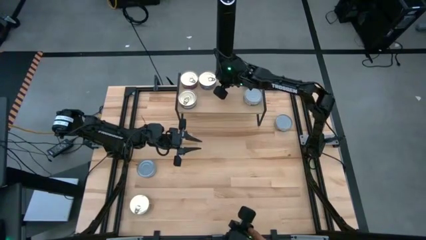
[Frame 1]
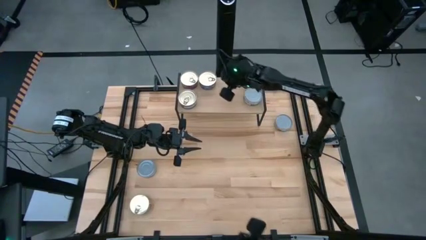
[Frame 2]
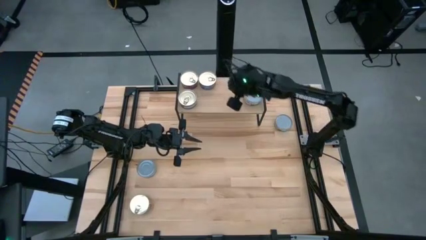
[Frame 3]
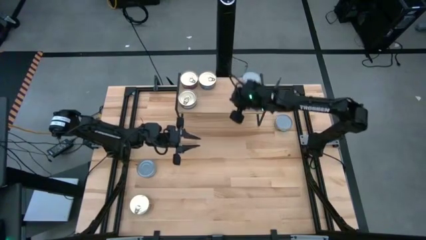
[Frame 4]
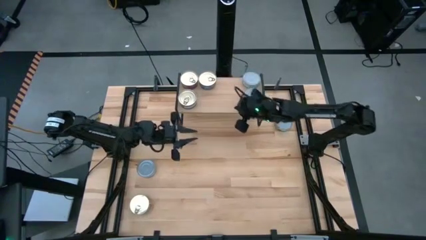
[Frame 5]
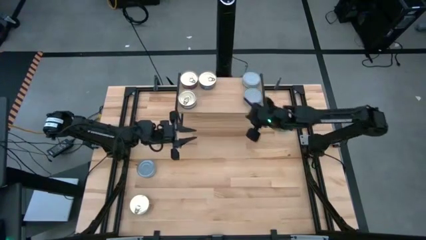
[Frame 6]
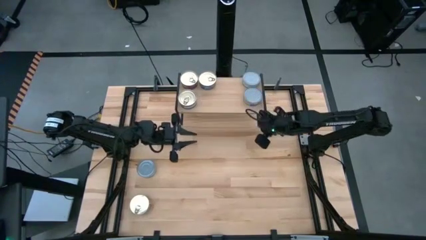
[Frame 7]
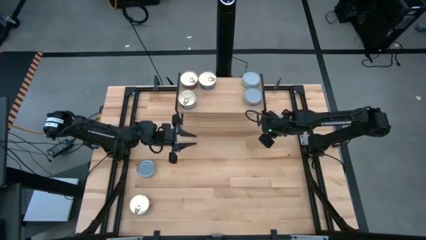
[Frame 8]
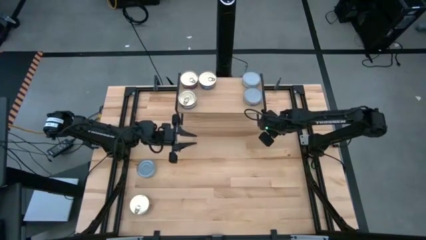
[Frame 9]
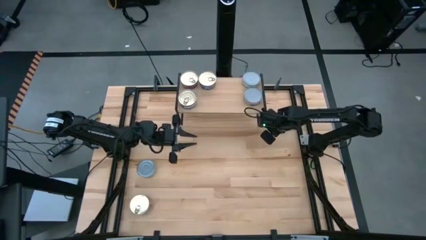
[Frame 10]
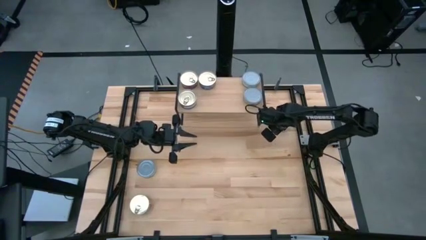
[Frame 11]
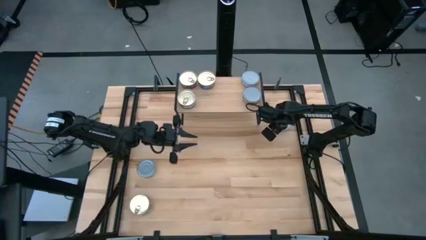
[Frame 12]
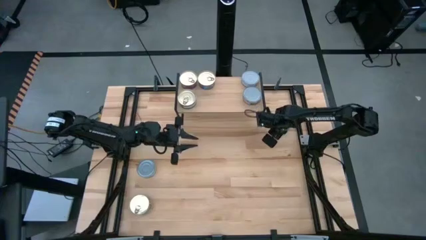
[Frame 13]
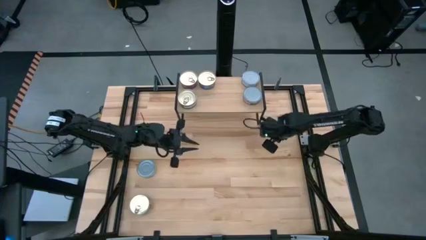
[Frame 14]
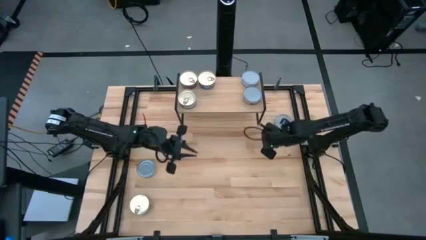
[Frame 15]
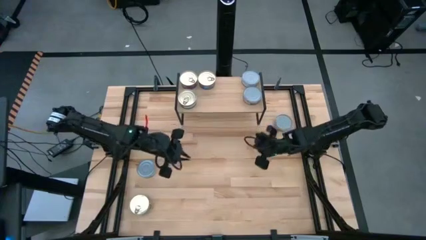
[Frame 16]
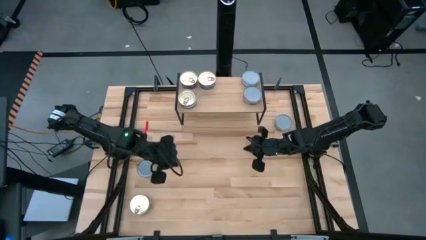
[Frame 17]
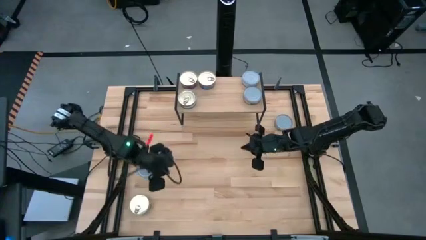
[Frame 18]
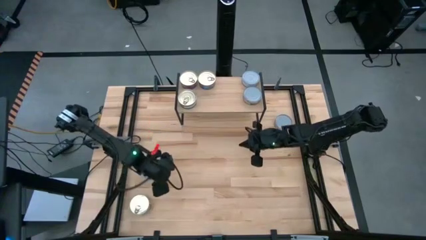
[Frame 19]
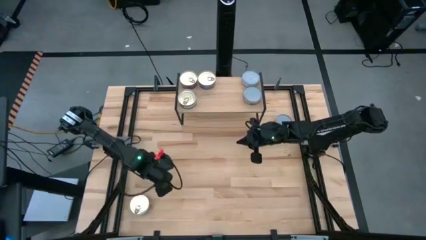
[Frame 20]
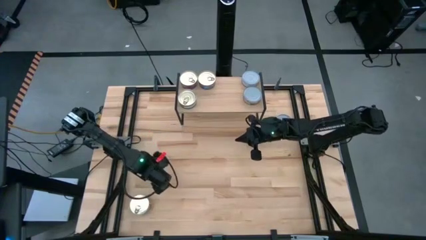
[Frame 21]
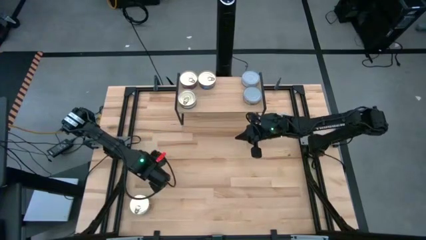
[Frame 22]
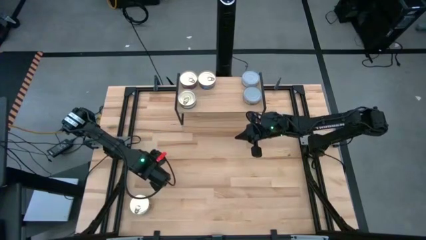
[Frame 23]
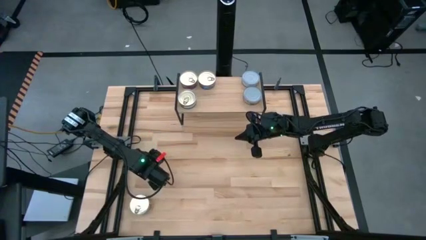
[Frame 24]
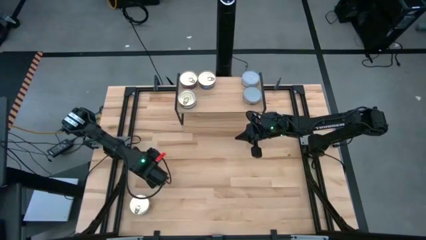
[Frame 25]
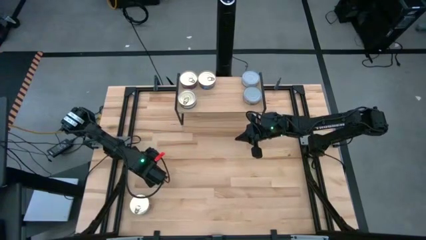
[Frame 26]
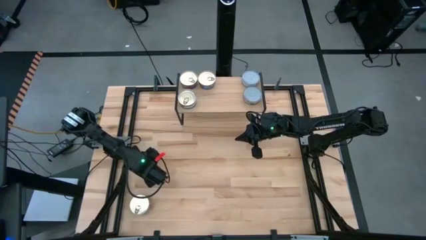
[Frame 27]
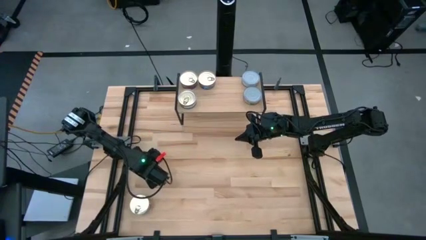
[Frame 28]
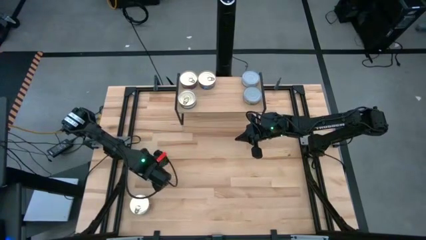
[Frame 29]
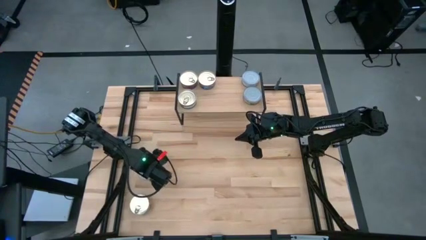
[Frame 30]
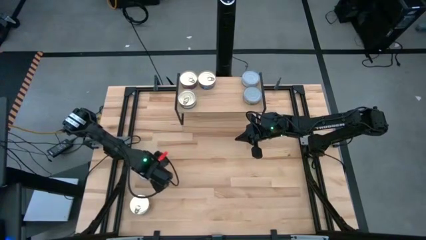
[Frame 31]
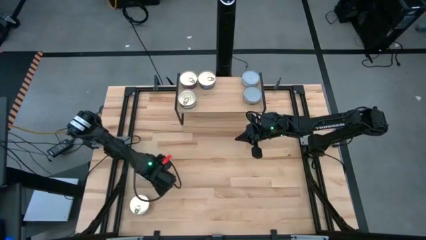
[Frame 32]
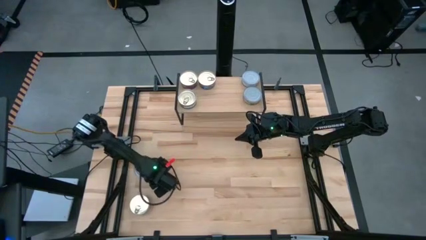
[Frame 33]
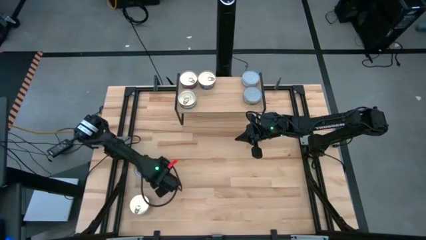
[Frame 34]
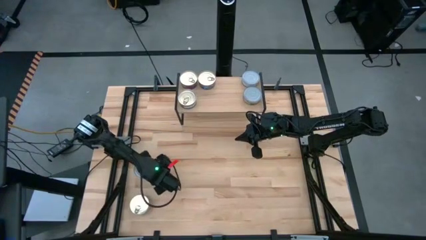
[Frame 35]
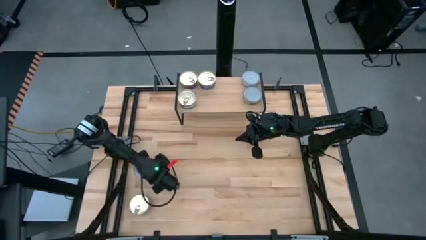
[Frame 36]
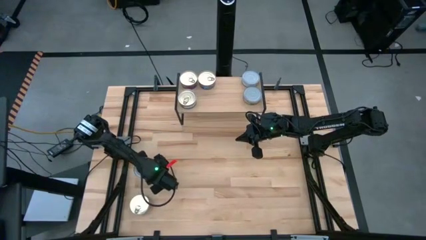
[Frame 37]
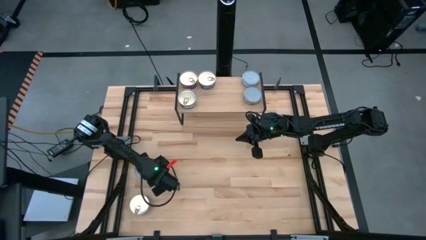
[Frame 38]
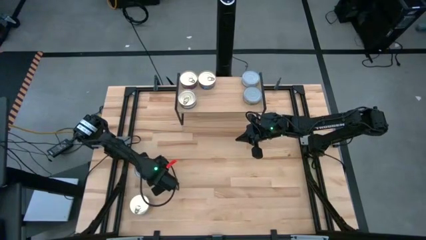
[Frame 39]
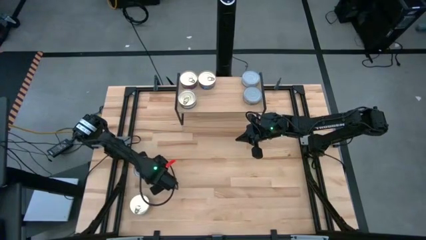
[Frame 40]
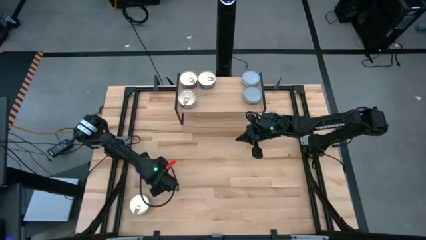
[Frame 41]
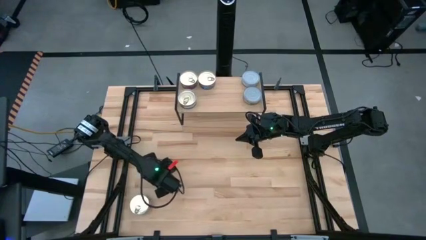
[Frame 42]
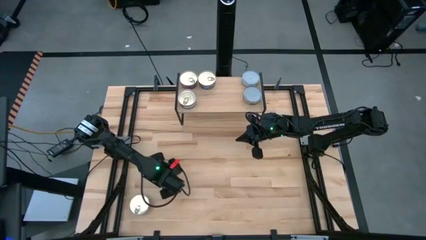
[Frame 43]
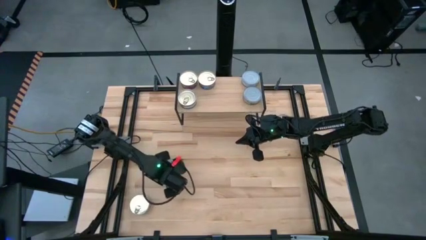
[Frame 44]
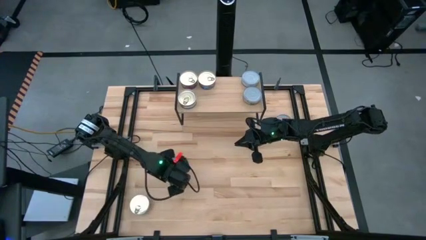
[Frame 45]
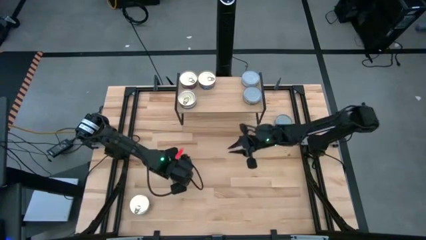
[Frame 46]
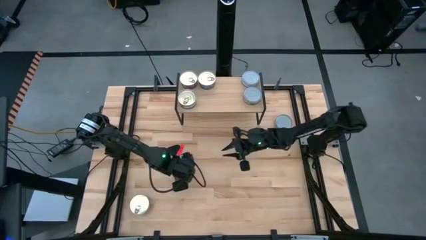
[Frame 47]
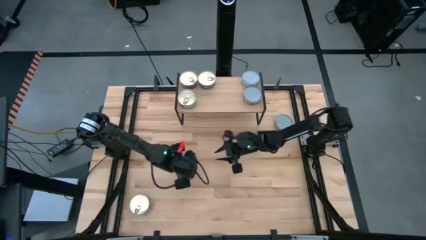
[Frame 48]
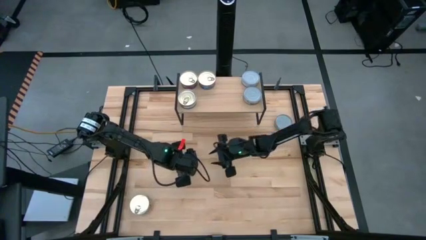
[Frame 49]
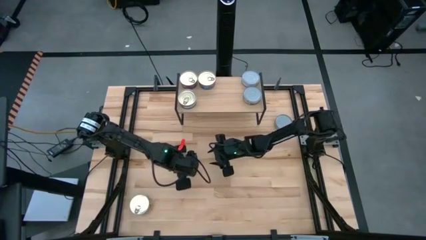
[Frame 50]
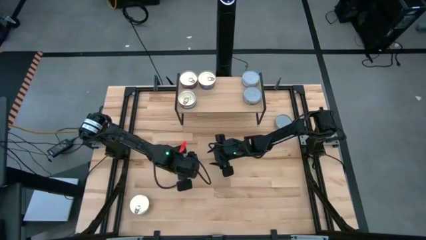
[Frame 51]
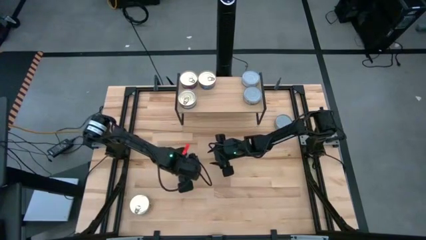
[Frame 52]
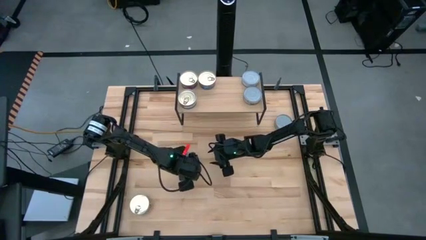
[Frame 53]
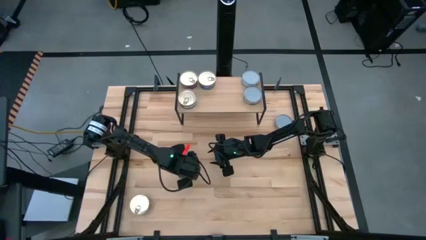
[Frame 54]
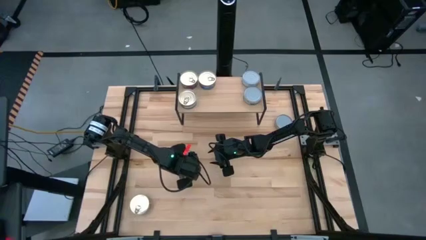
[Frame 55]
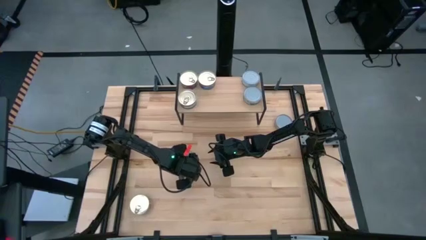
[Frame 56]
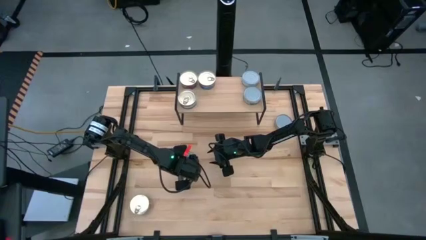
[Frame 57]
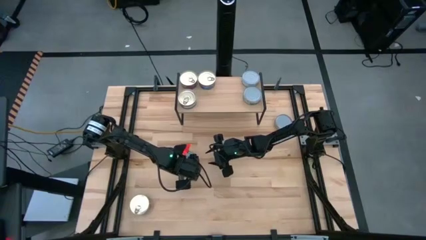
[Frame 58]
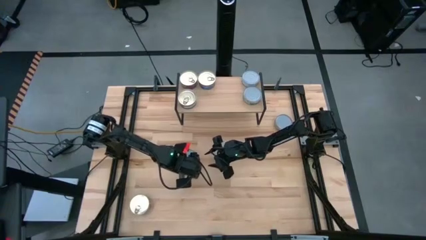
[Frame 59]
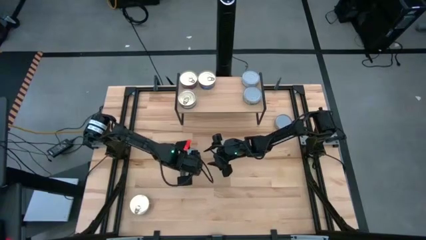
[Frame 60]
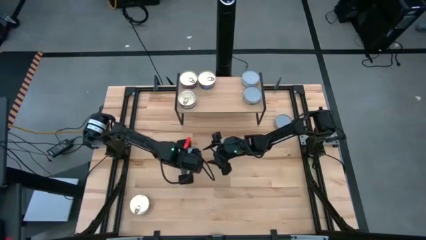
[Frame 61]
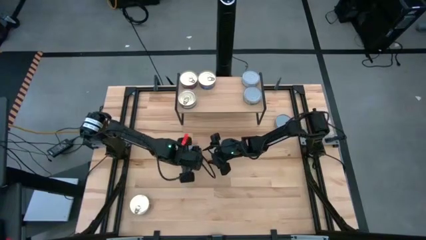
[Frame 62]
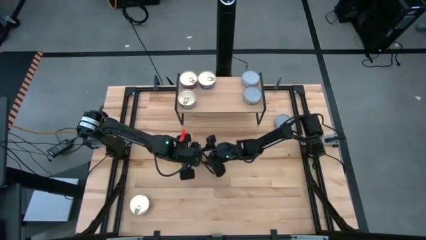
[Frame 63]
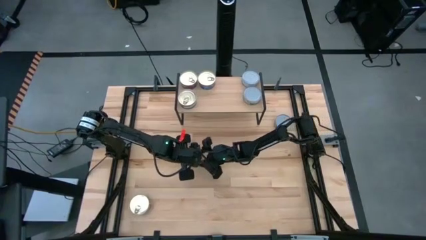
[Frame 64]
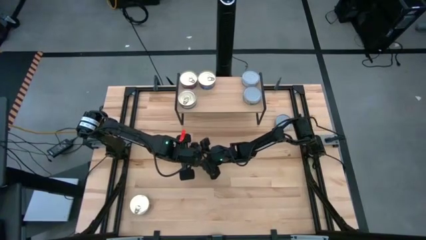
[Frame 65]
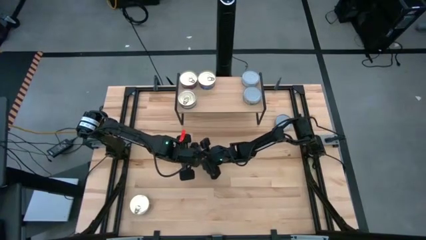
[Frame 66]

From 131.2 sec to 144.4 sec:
Task: Stack canned seafood by type on shelf
Put the bottom green tuna can on the shelf
